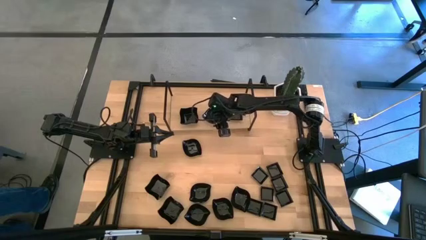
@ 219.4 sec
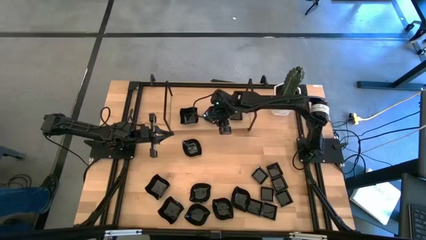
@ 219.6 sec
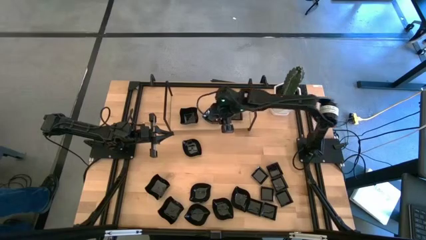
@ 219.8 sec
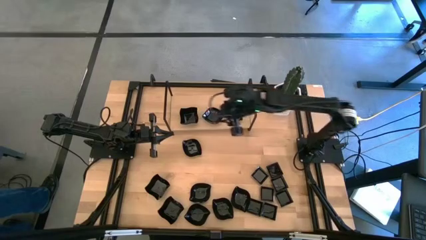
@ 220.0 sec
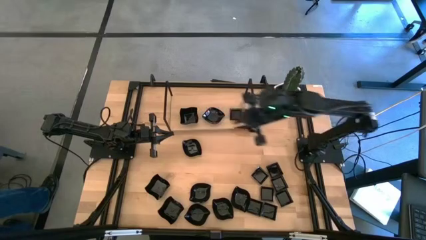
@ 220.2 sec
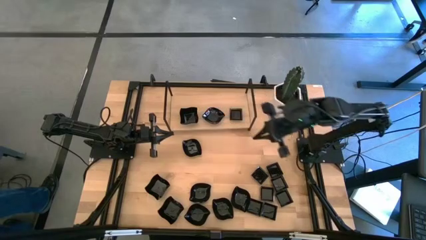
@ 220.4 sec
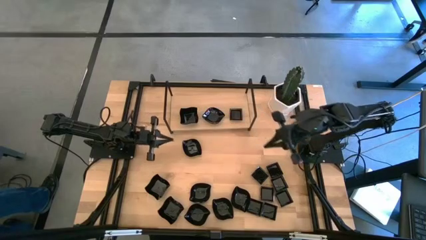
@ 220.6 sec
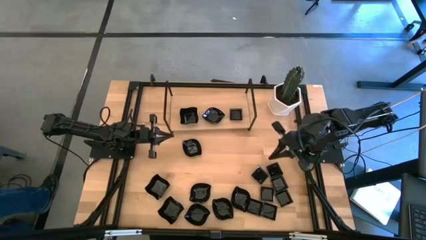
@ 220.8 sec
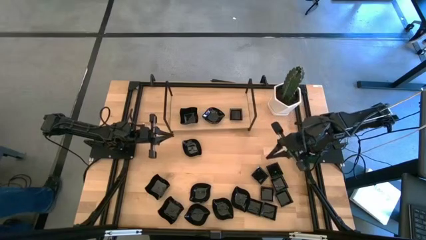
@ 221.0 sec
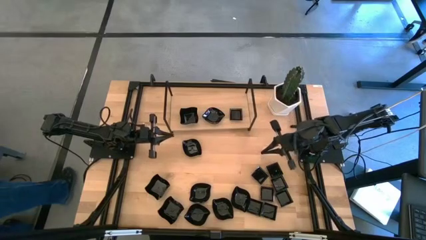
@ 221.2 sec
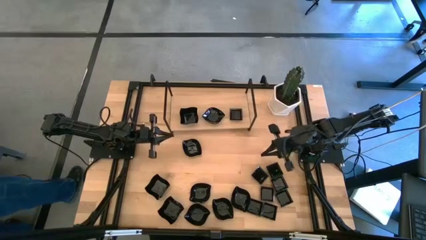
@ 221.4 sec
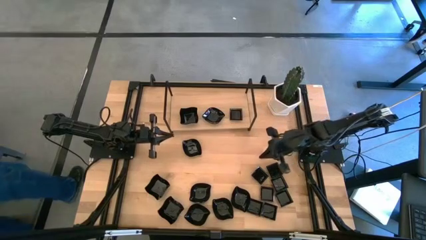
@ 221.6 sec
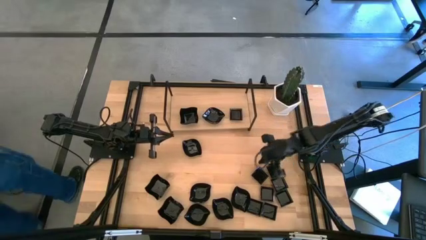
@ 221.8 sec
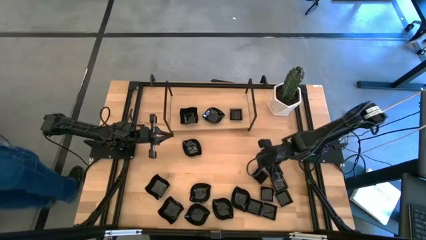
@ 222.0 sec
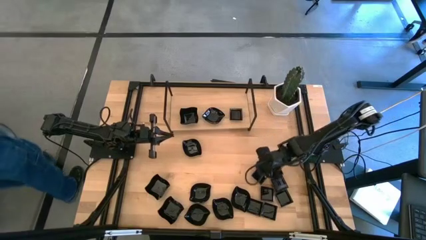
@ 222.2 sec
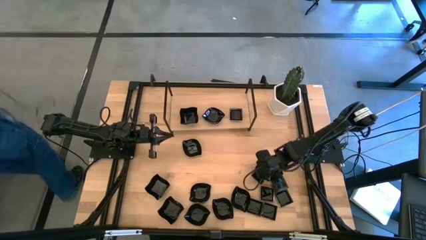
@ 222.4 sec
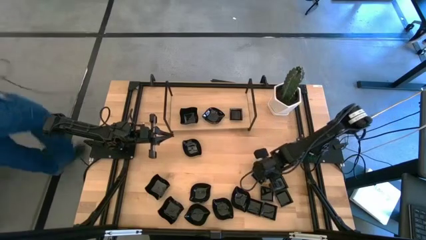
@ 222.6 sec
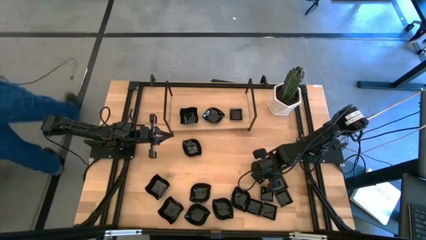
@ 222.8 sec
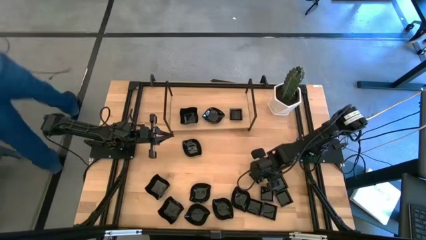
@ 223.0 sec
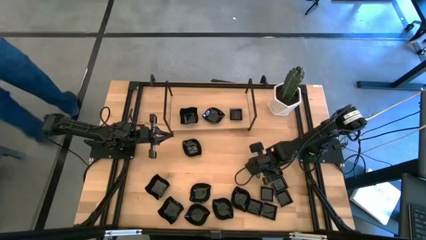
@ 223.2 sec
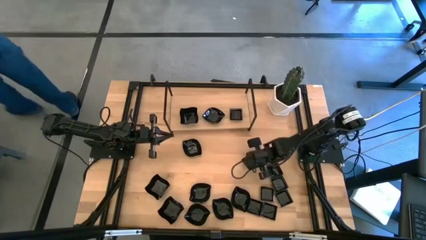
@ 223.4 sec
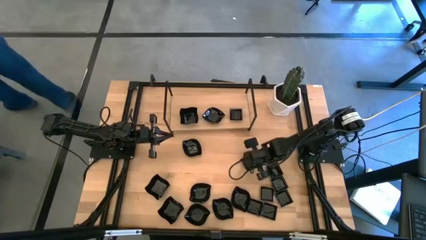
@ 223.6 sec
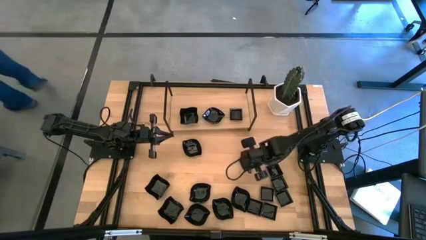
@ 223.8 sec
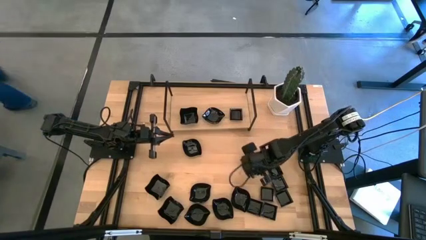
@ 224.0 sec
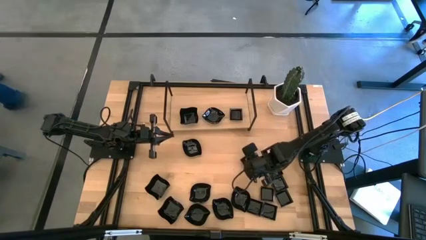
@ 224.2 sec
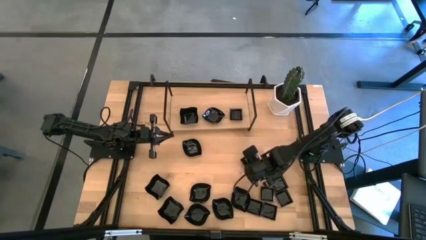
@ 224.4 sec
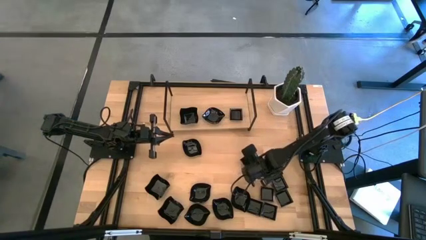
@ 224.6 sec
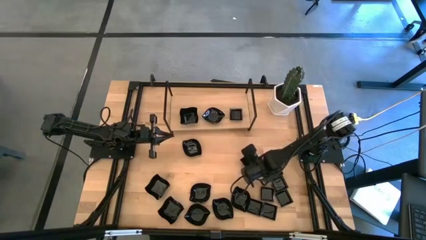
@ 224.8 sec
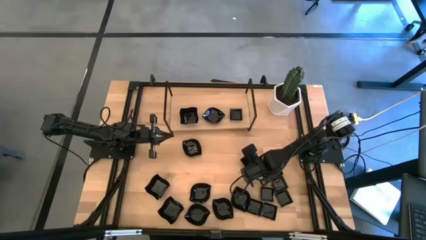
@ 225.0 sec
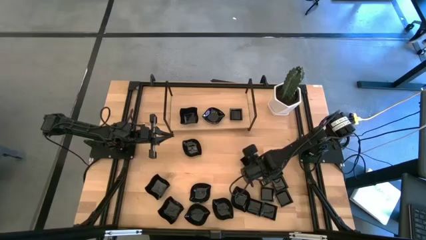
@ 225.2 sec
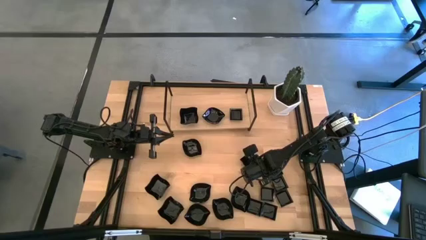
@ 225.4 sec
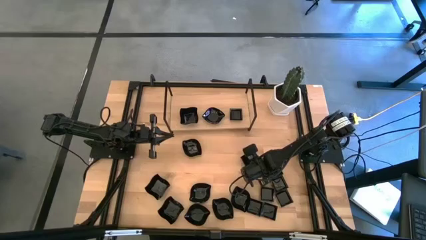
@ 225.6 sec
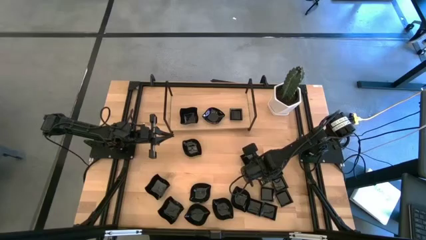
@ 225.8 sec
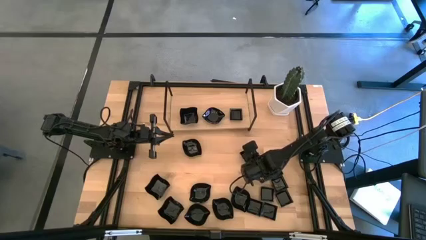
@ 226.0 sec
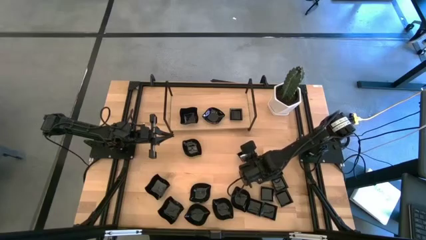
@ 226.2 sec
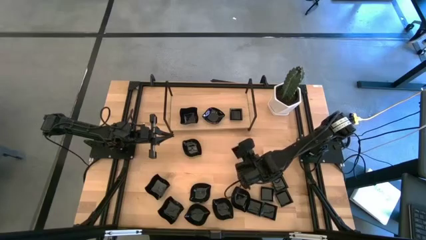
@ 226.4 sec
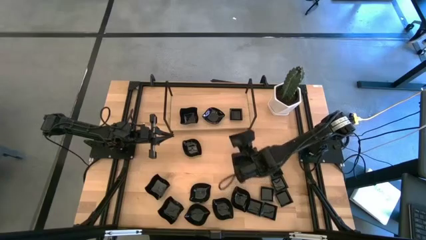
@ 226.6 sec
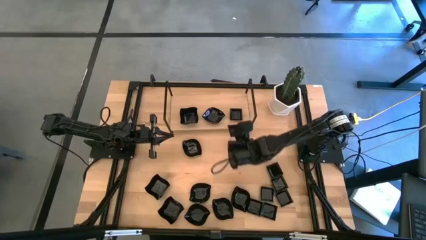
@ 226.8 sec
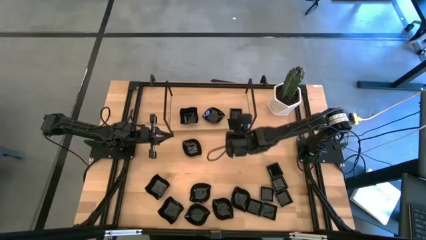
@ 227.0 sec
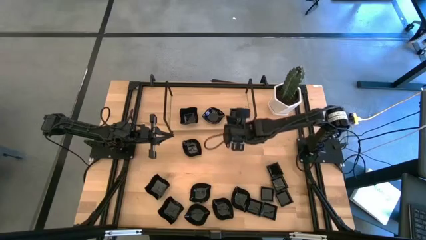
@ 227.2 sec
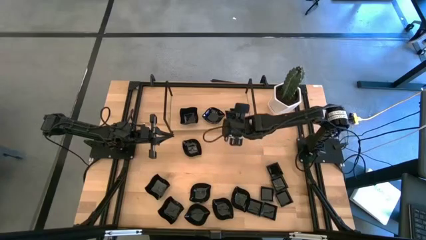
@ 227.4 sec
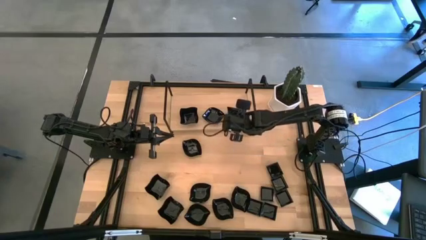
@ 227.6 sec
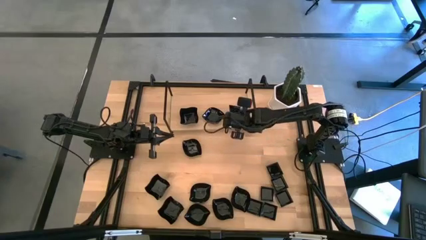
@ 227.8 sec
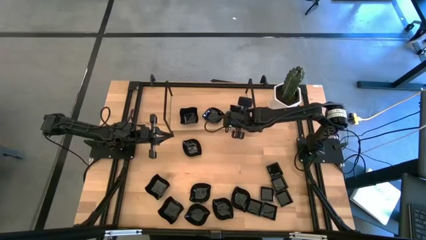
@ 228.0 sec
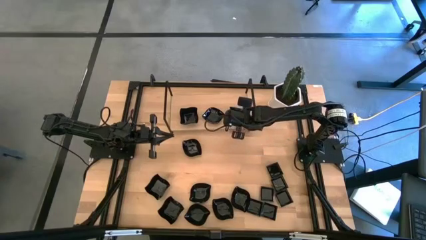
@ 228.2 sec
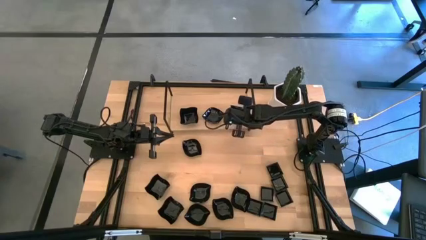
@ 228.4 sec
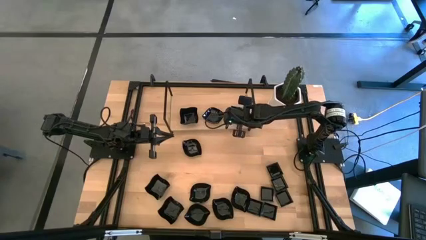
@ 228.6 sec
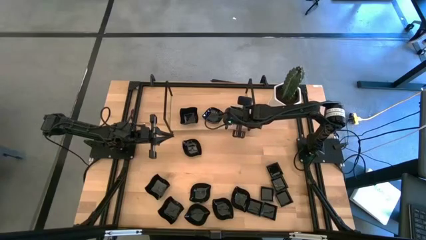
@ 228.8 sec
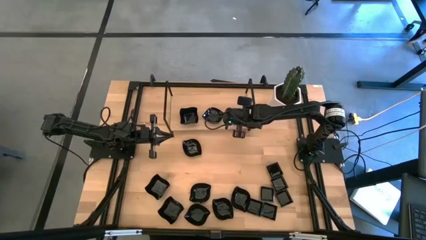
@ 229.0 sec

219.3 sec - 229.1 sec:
Task: Pick & Place Mini shaped plates
Stack the square plate on the top of the square plate on the shelf

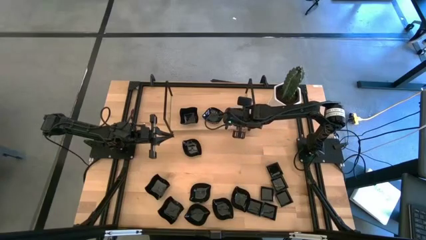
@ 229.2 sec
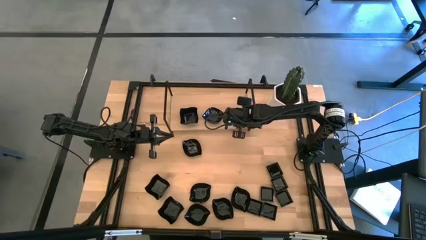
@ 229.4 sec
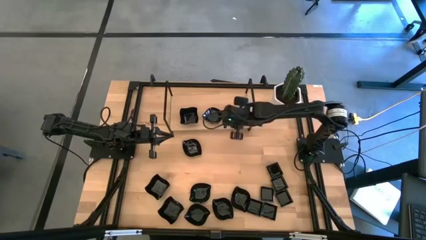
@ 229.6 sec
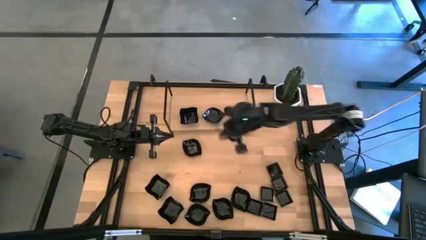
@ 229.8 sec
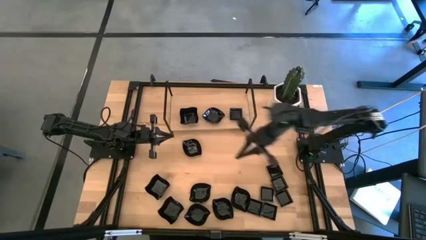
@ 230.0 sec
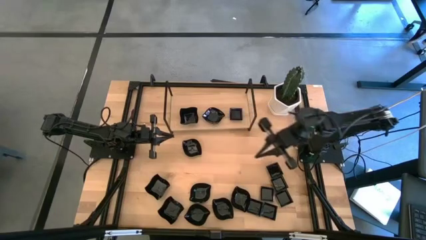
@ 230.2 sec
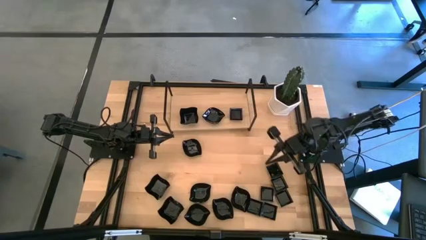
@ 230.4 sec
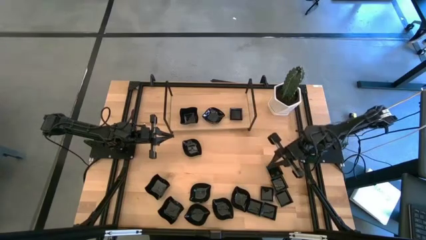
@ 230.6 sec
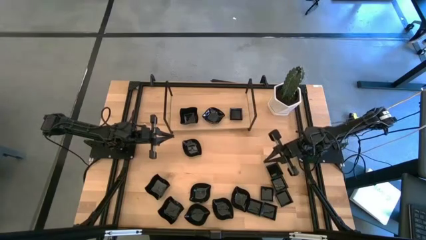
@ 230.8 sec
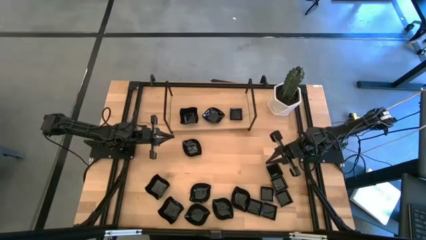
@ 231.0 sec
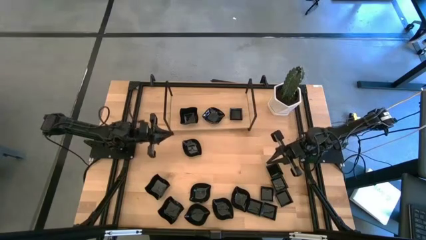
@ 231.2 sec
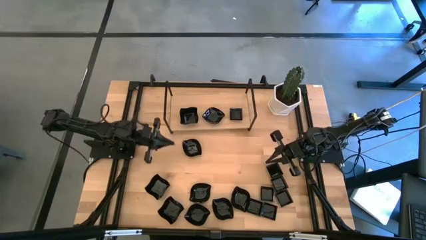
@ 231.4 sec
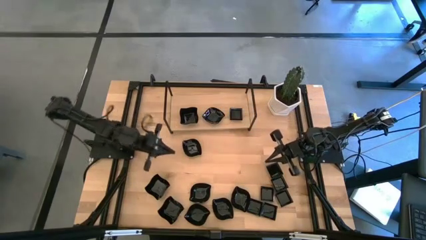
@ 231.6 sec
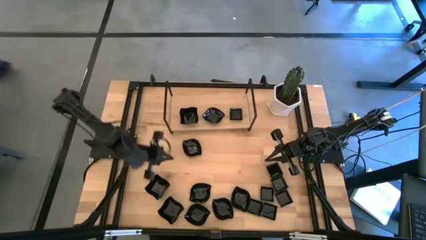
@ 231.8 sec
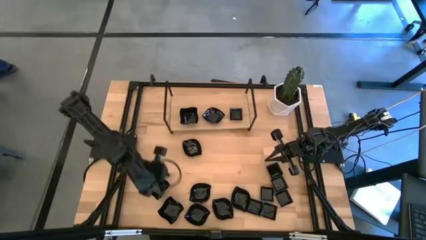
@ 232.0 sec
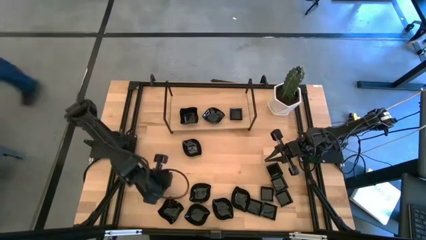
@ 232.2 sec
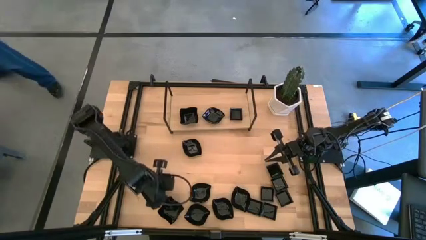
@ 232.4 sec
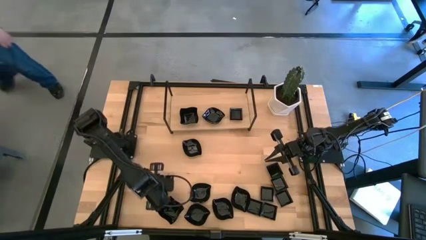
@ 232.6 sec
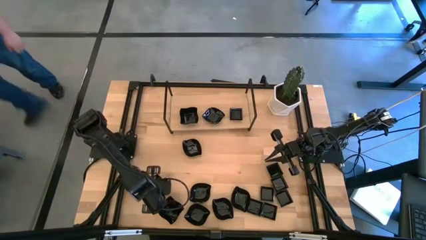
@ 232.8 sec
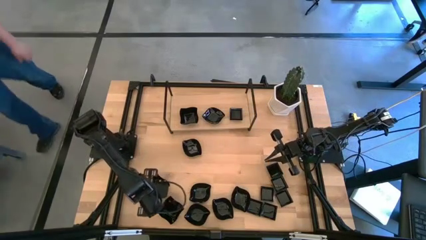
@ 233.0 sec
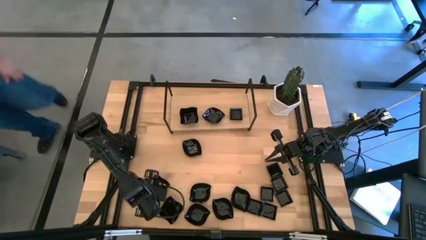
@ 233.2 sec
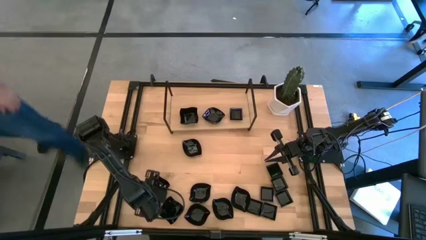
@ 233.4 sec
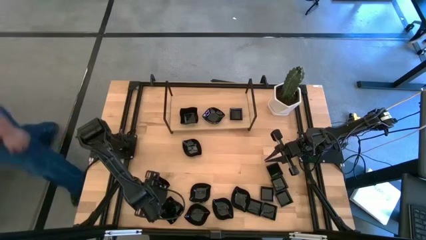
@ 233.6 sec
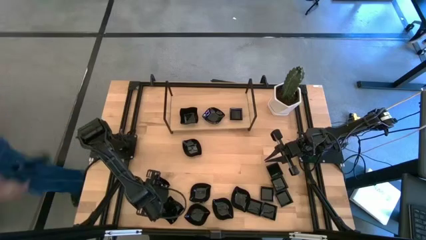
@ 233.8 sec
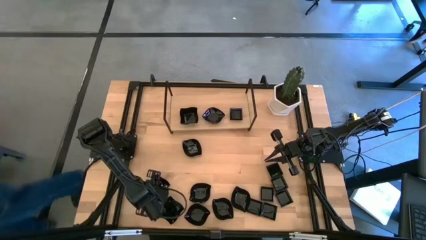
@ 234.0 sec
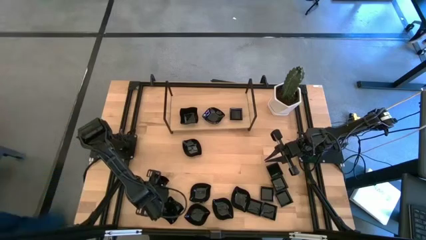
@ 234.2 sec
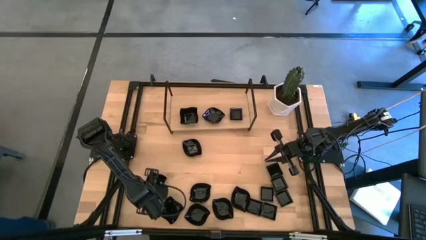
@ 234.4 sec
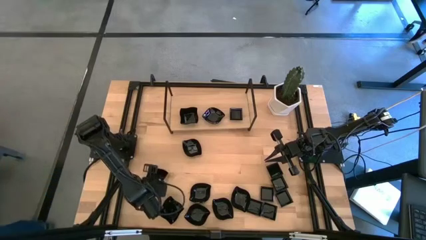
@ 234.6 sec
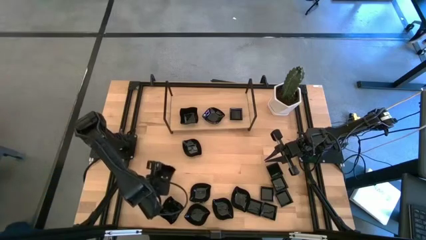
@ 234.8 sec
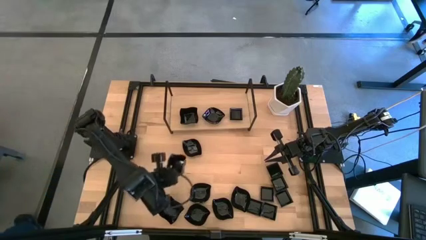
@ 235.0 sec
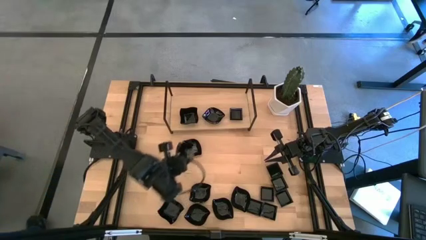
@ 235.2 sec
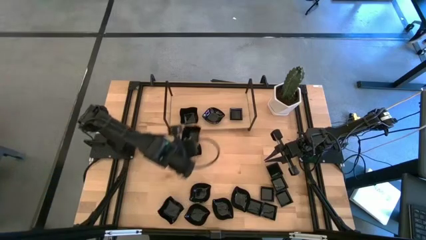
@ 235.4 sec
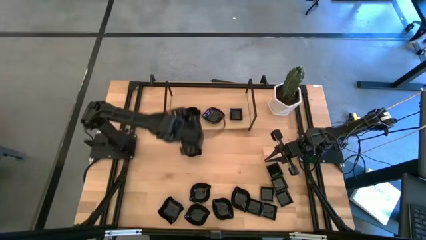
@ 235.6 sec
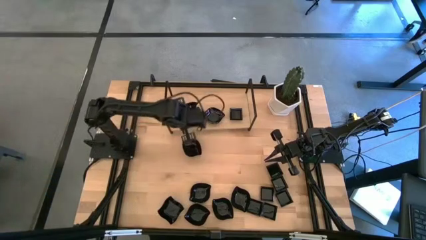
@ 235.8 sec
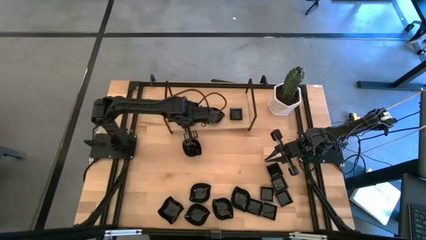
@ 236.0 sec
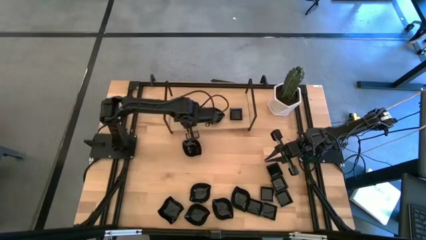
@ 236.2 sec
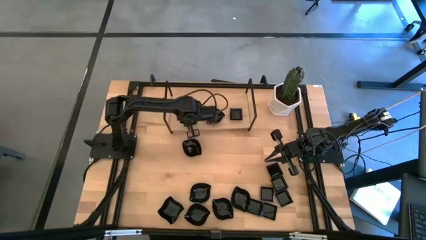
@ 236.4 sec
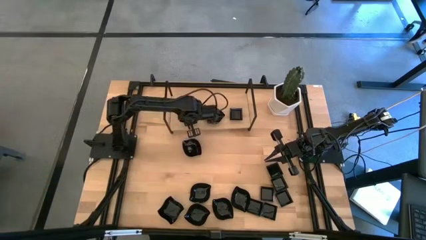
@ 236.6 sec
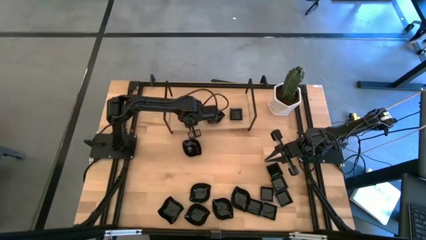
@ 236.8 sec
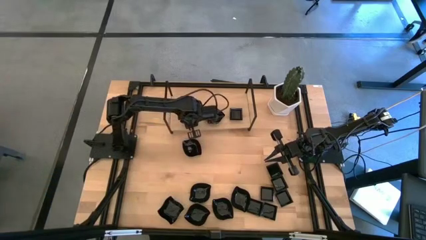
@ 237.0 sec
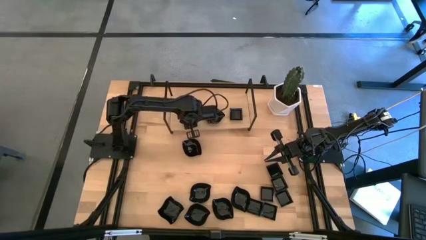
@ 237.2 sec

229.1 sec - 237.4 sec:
Stack the top distorted square plate on the top of the distorted square plate on the shelf
